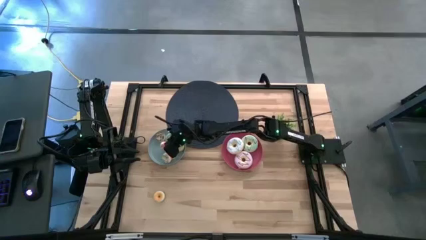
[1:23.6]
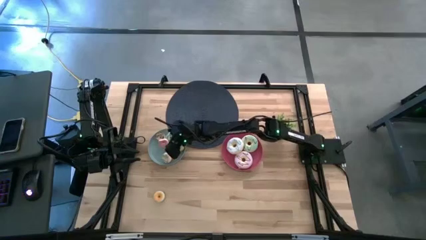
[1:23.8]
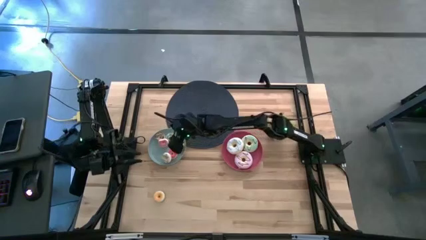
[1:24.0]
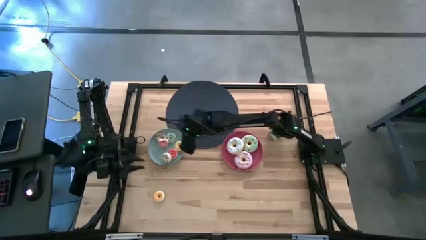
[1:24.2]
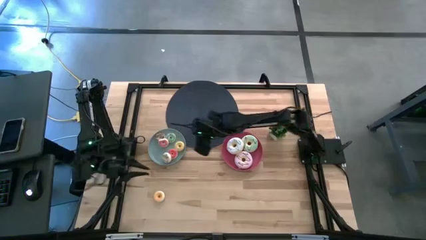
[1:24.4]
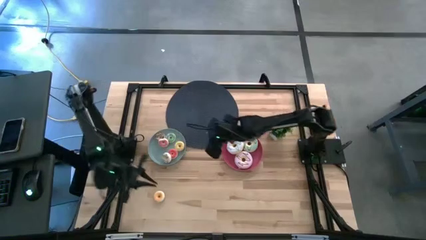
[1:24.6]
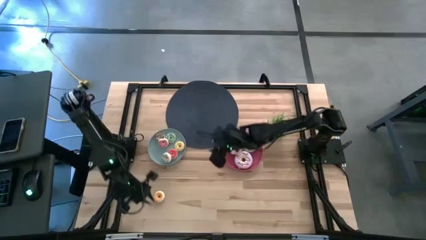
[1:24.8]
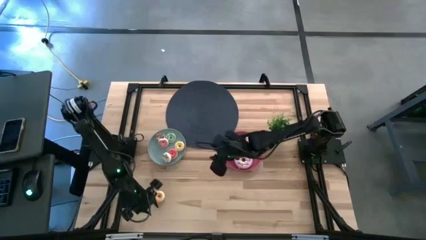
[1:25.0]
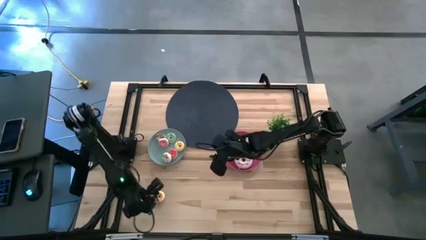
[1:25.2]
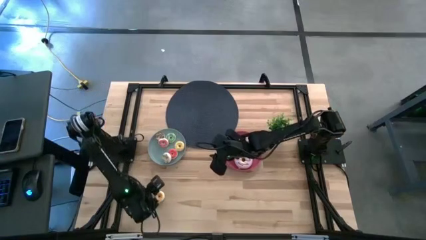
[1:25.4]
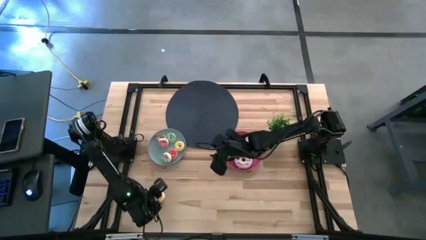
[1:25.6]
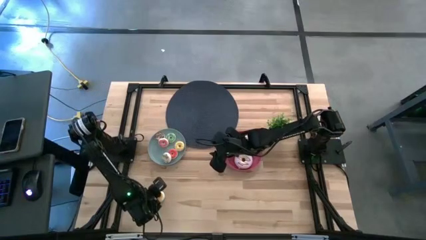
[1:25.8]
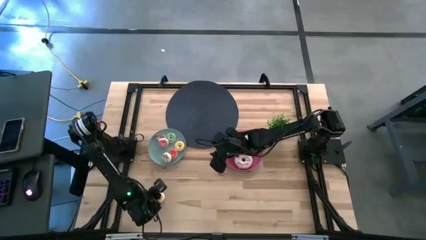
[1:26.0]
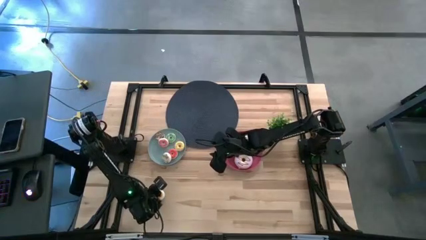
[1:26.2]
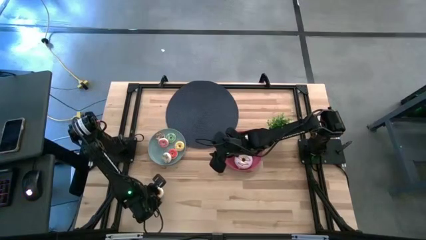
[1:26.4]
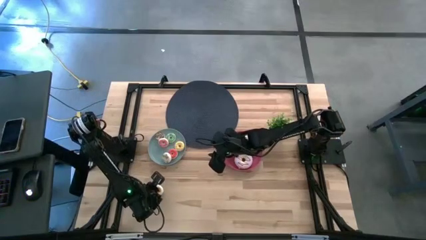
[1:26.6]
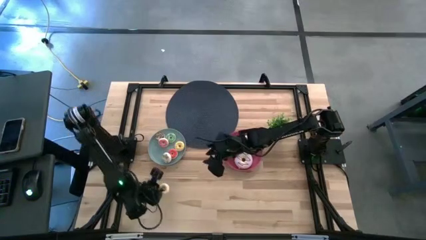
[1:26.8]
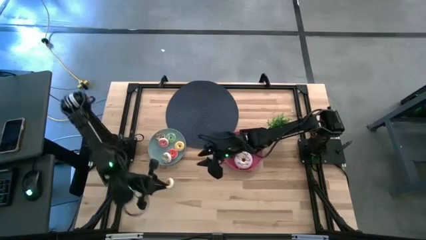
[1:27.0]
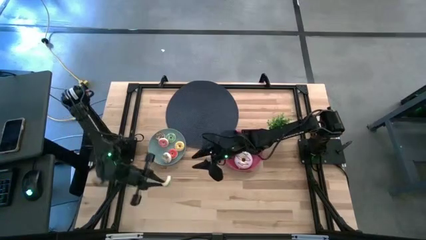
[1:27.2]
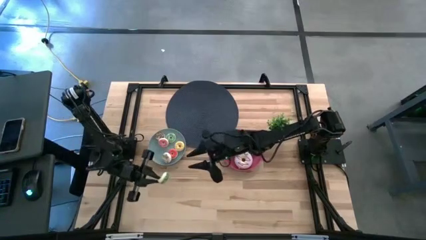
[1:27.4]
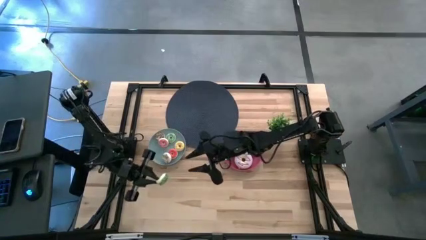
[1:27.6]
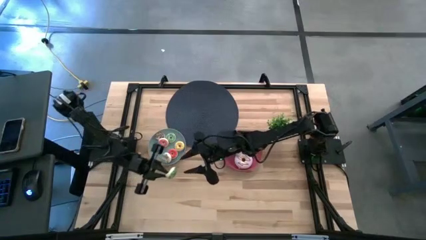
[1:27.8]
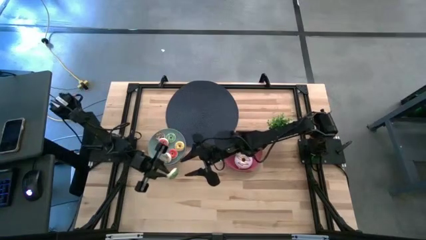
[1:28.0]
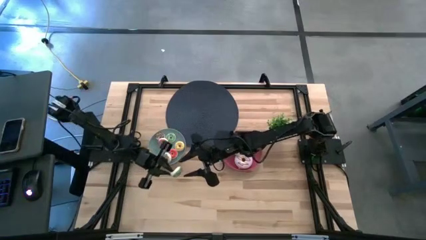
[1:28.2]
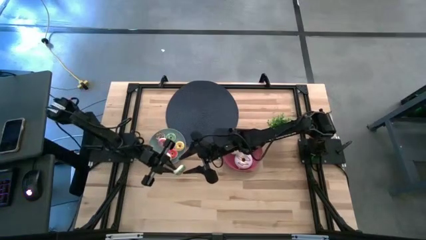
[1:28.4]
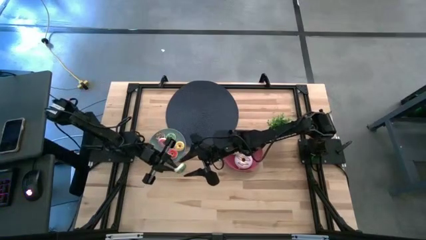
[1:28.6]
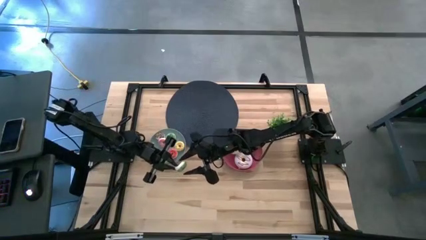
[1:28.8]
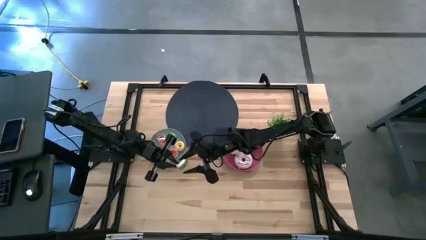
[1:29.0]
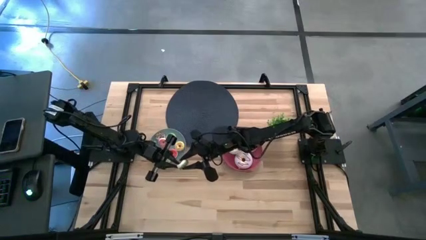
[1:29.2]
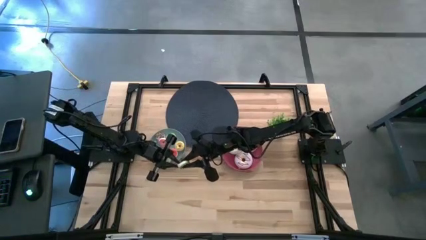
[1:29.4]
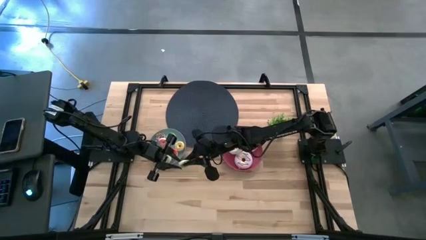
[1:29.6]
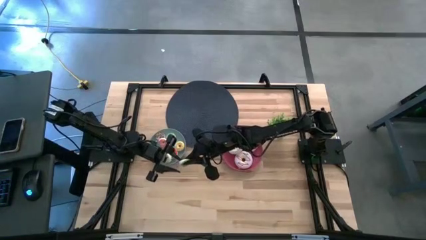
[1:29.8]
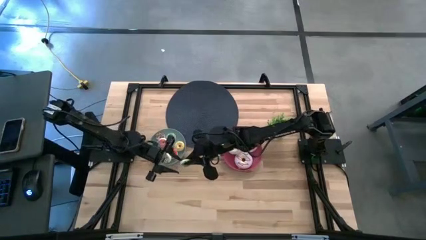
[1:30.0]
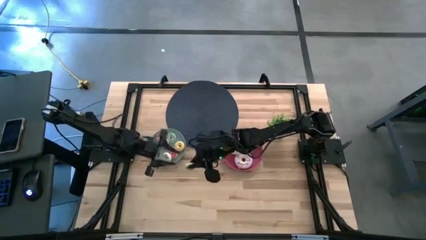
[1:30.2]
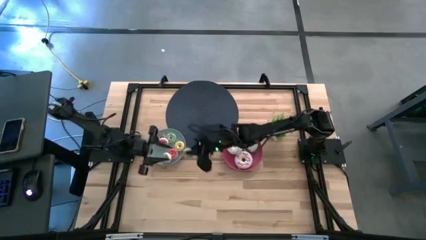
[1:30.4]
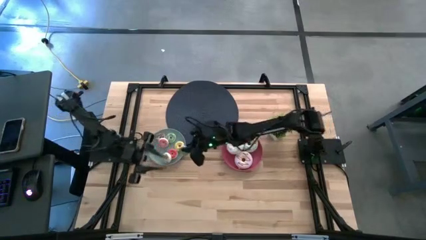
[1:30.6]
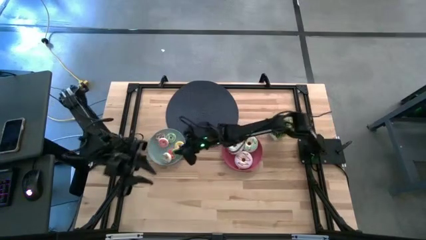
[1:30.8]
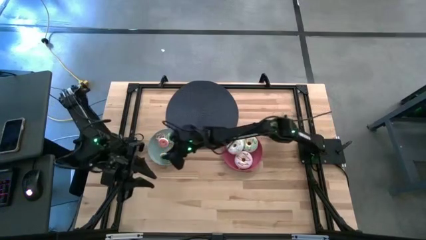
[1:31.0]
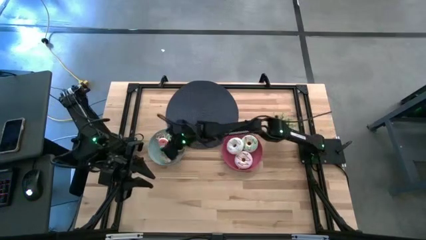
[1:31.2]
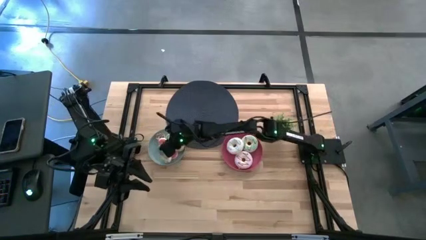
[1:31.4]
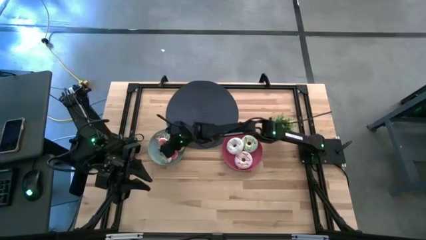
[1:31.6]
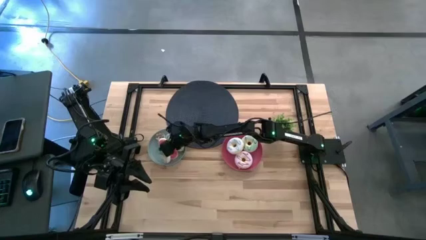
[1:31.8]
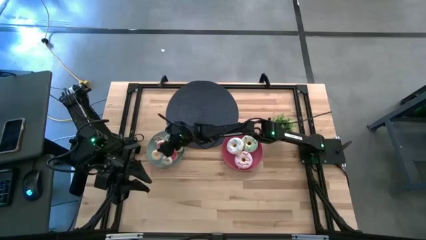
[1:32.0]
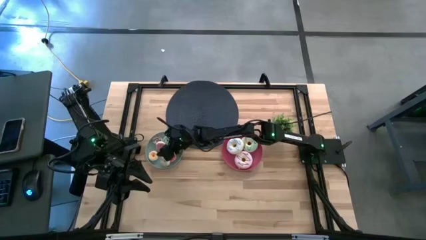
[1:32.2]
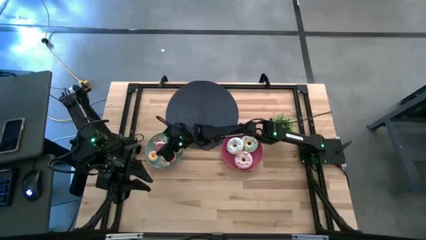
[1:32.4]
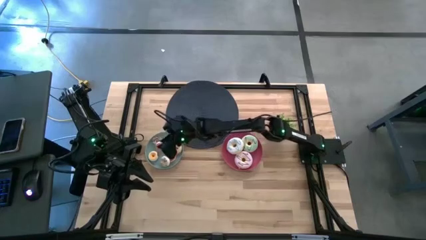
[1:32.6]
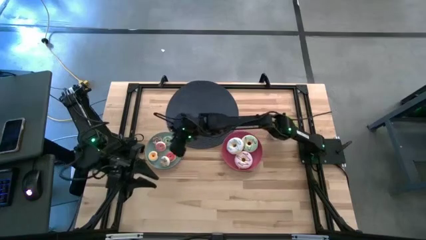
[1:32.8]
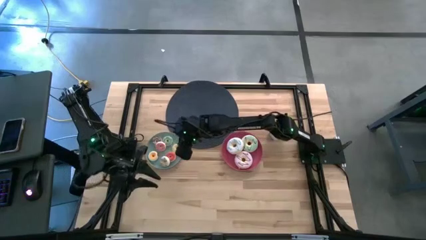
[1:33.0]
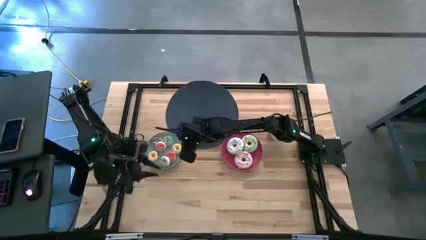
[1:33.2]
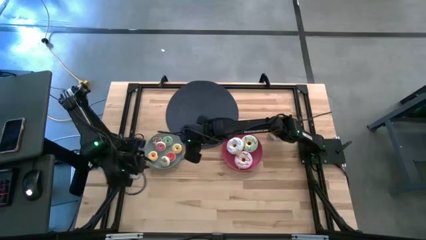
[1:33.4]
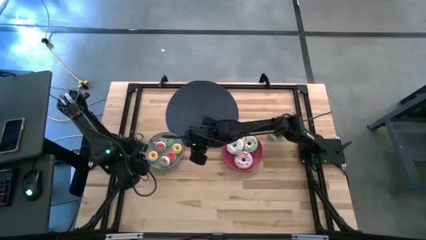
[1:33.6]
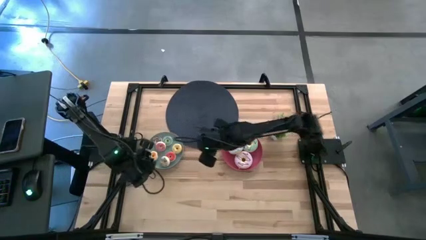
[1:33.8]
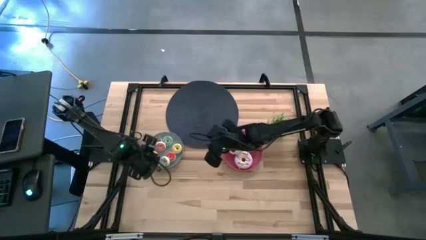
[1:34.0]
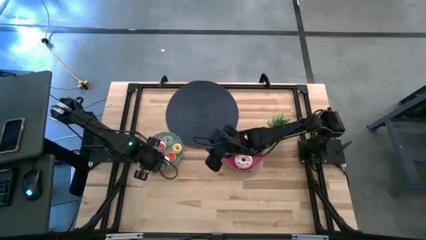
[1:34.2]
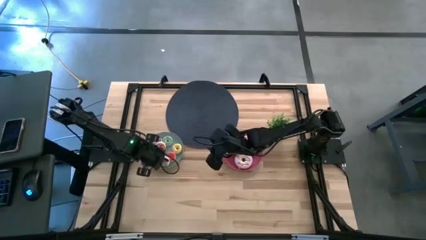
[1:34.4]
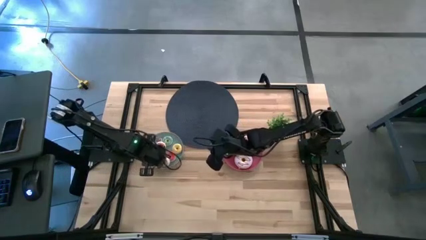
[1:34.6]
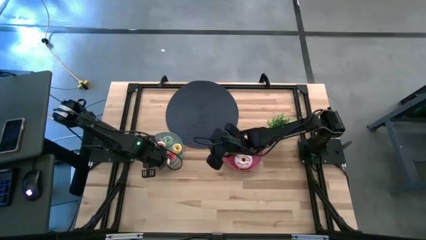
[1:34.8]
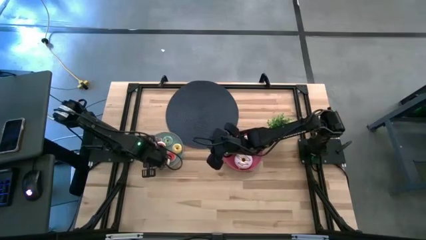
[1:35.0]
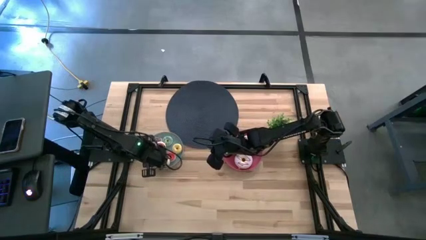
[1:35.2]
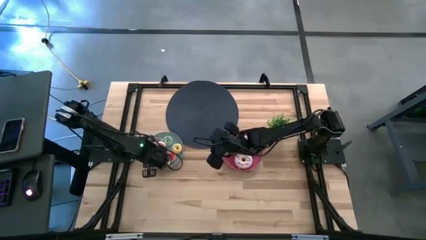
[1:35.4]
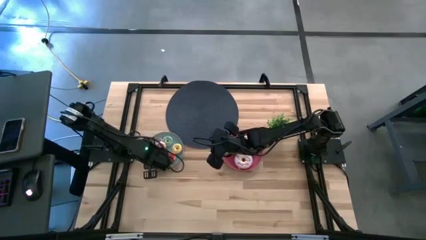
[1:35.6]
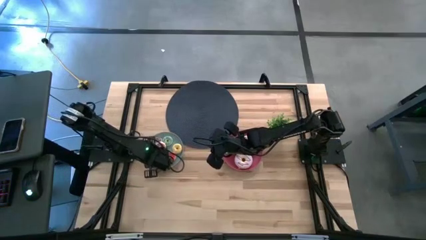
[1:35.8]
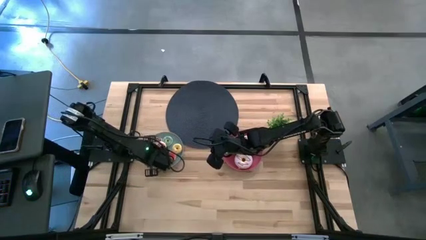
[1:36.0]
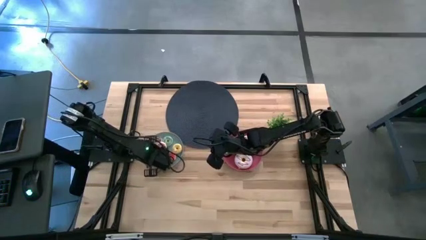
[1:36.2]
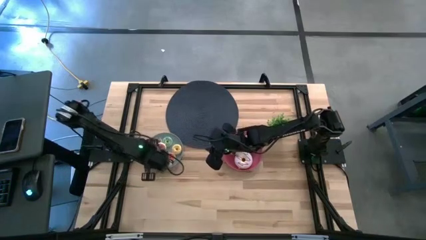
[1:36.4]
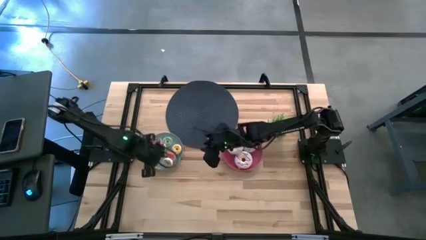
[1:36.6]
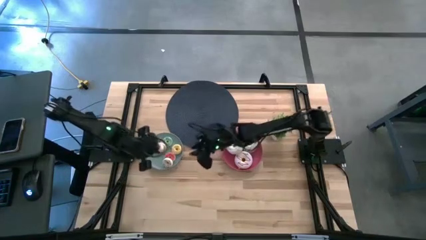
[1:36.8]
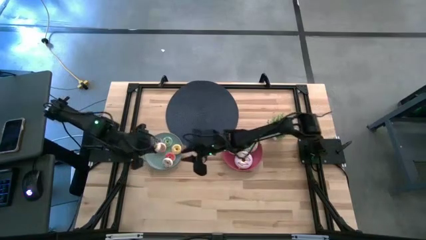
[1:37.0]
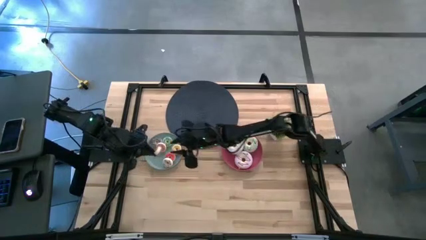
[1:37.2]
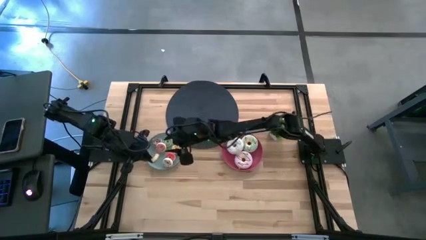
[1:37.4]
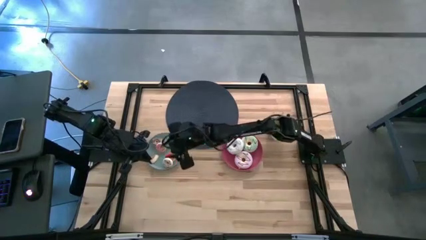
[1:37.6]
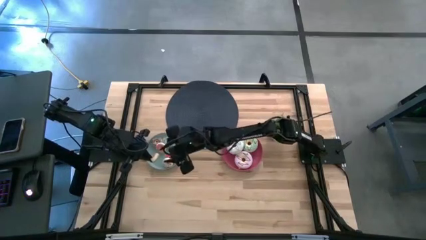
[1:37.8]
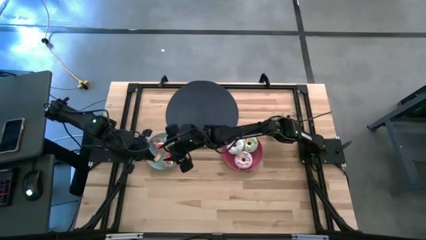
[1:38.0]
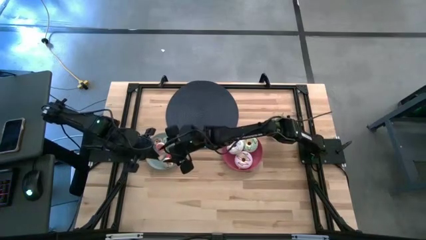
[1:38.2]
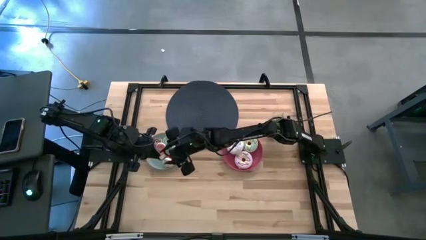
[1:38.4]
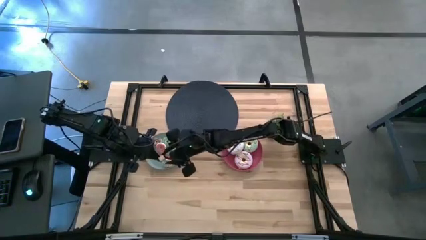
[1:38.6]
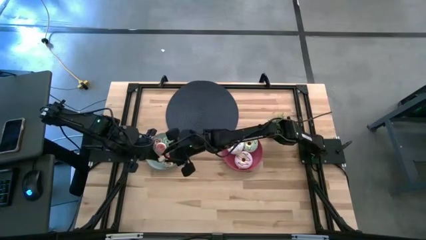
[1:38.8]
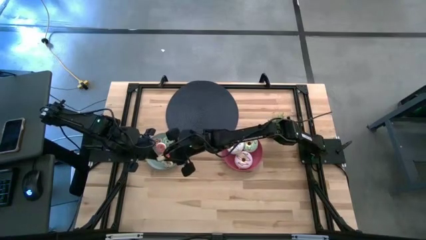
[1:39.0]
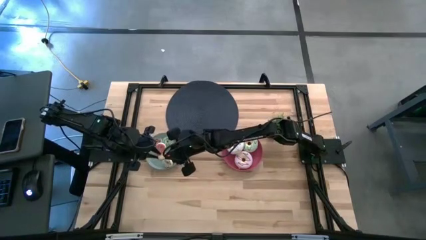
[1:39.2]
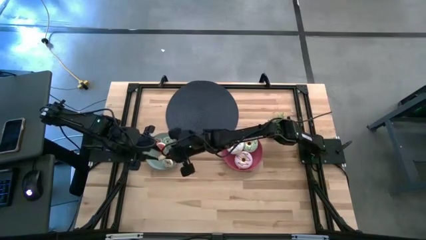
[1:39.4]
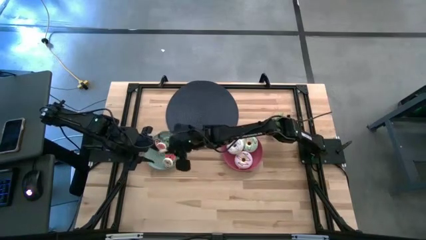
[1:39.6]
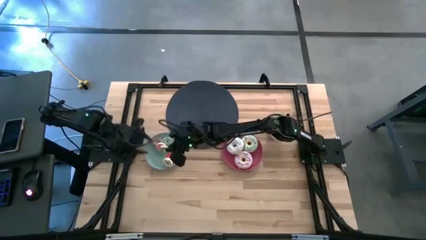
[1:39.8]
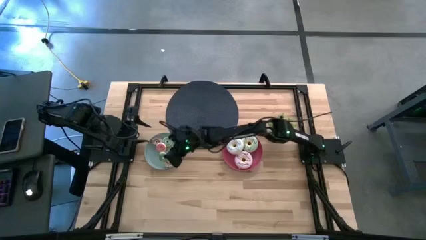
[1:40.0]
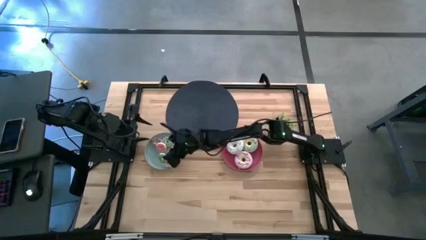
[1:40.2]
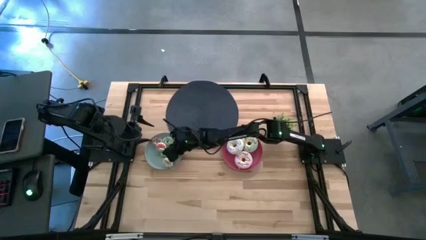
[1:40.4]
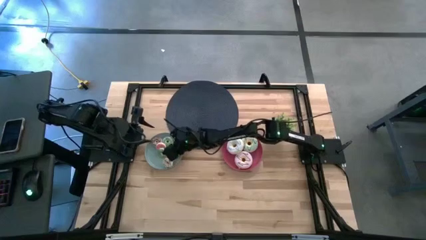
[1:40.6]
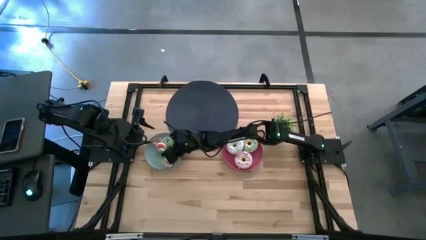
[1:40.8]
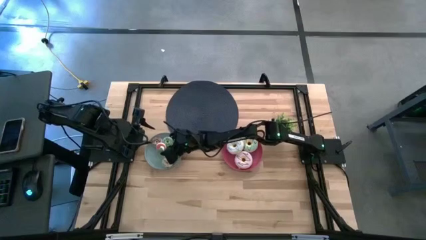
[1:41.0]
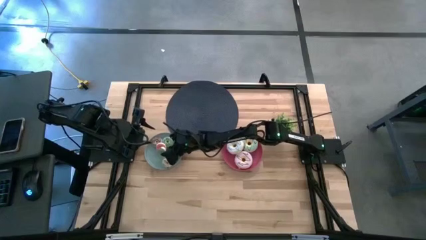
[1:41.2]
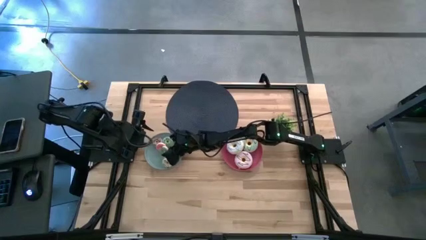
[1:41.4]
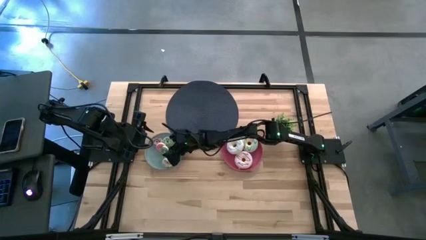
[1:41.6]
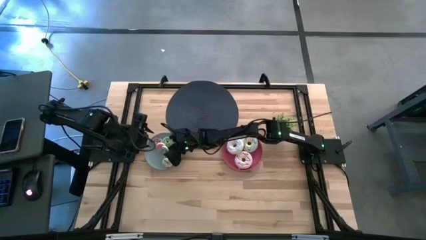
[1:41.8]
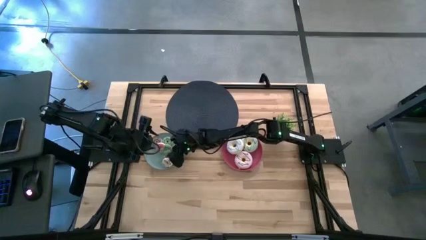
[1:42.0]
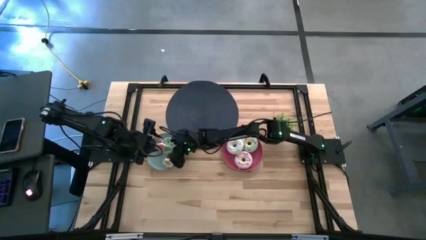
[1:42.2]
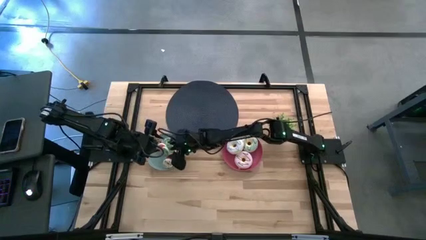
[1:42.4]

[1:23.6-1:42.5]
Task: Pick & Place donuts
Put the small green doughnut on the blue plate
